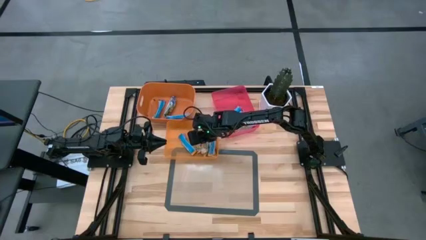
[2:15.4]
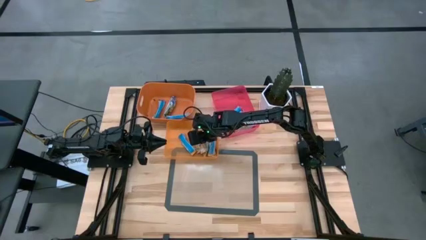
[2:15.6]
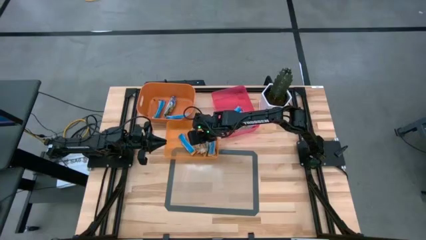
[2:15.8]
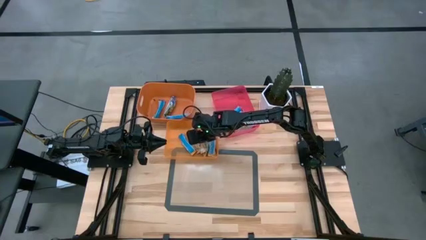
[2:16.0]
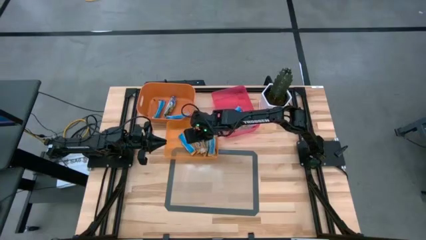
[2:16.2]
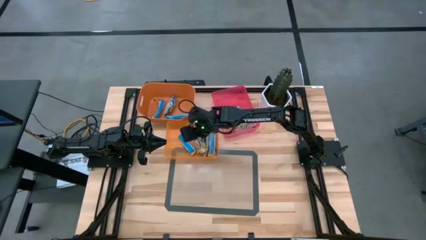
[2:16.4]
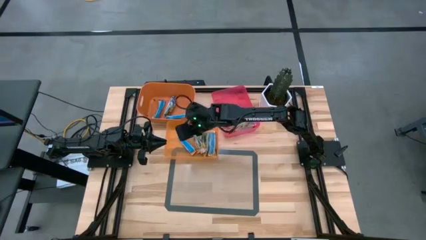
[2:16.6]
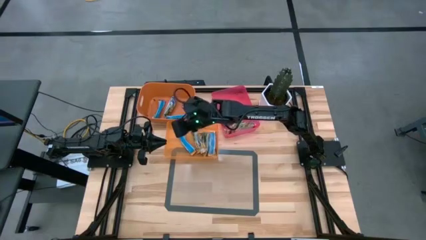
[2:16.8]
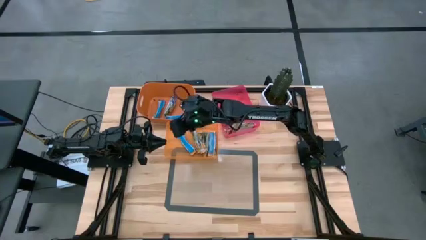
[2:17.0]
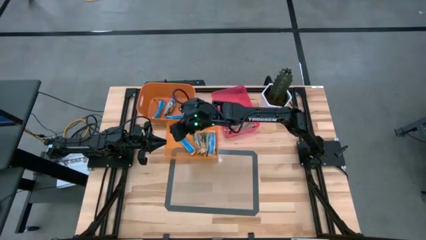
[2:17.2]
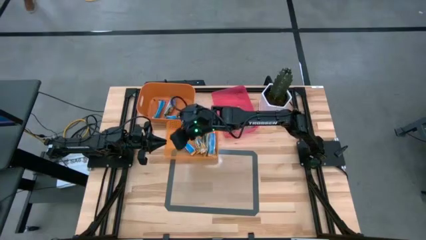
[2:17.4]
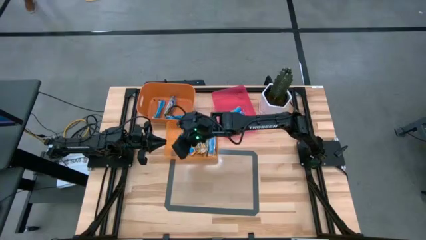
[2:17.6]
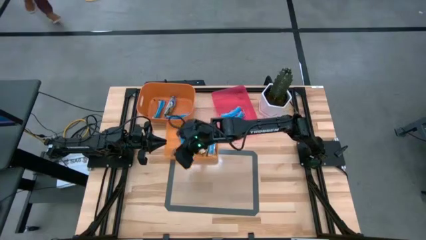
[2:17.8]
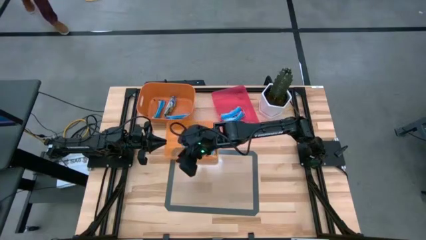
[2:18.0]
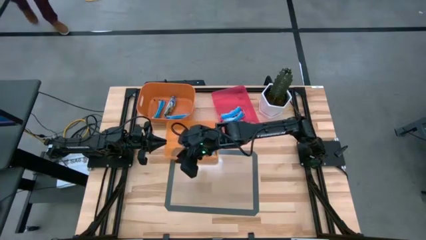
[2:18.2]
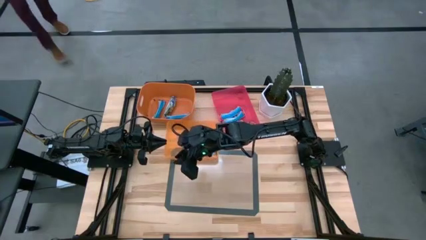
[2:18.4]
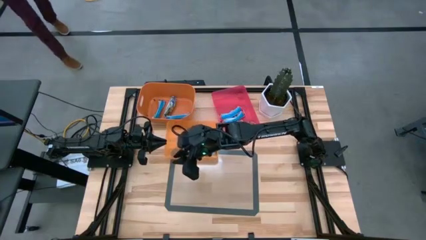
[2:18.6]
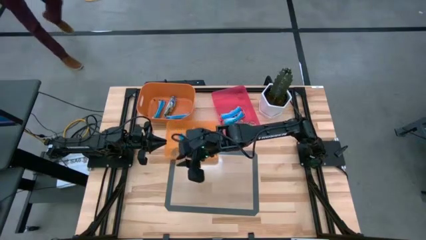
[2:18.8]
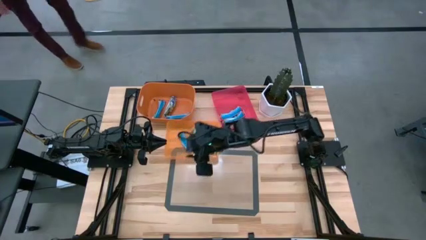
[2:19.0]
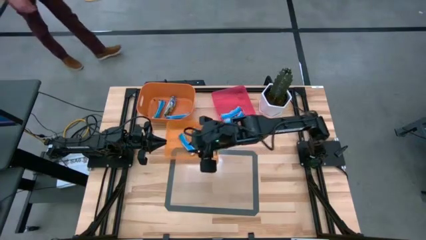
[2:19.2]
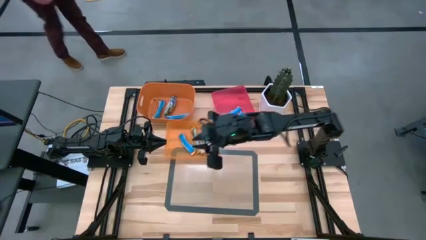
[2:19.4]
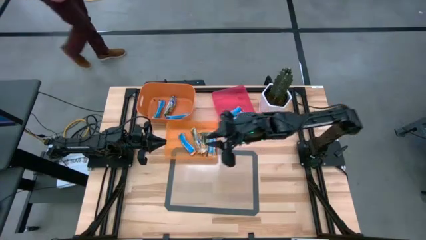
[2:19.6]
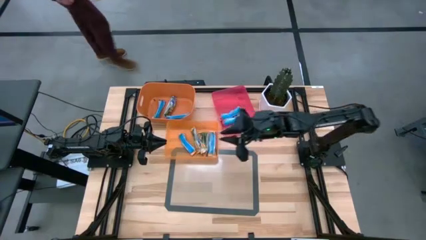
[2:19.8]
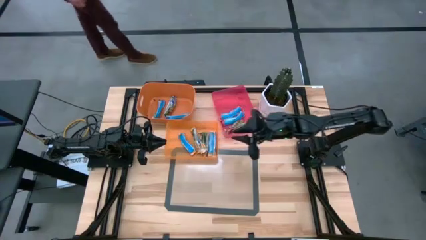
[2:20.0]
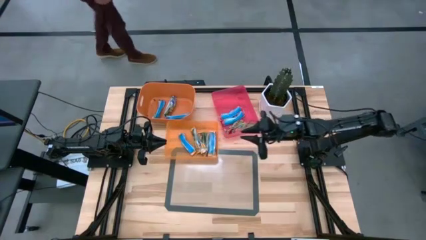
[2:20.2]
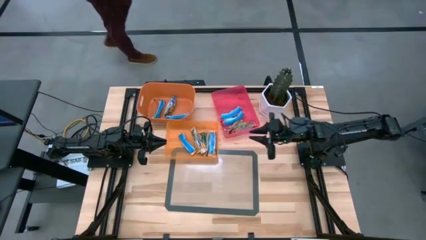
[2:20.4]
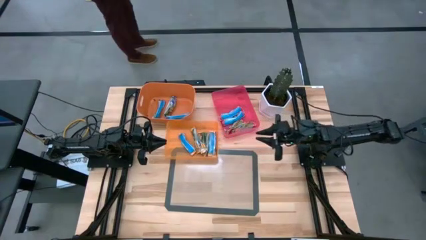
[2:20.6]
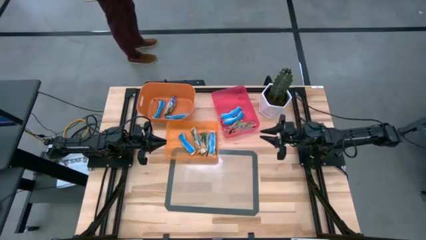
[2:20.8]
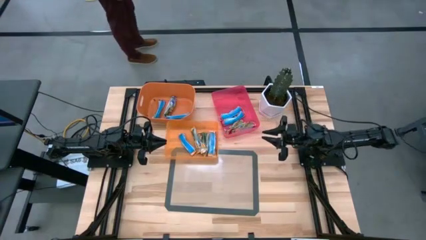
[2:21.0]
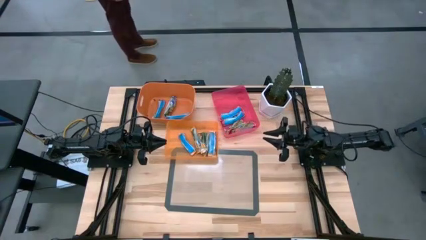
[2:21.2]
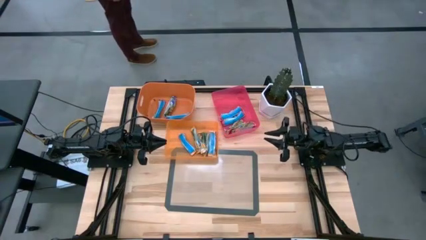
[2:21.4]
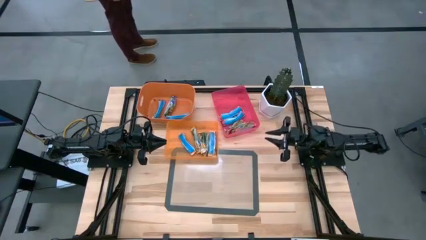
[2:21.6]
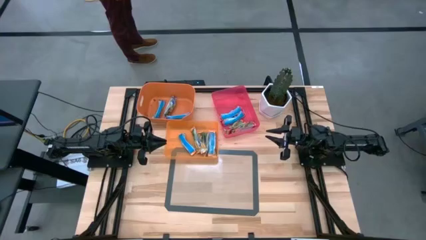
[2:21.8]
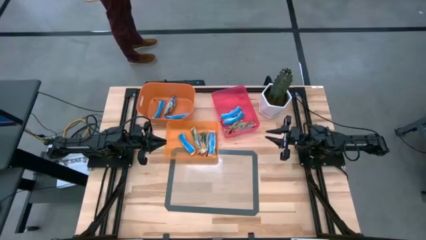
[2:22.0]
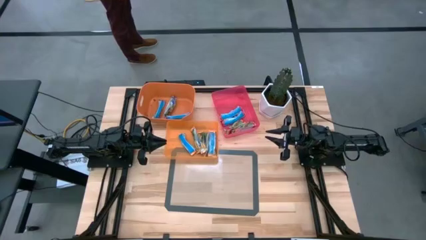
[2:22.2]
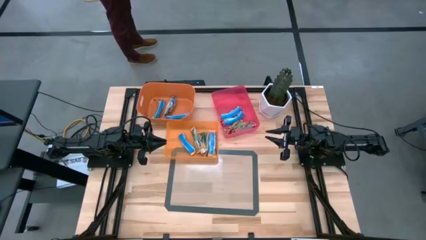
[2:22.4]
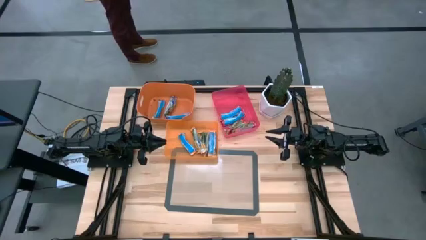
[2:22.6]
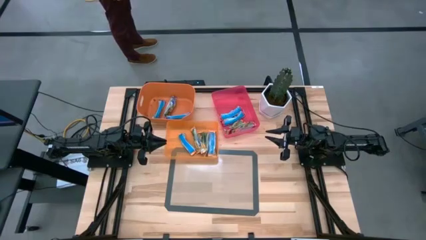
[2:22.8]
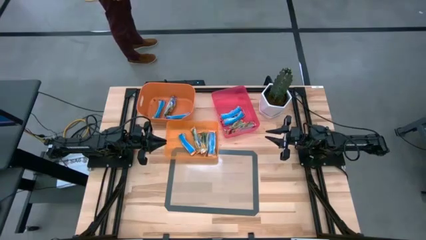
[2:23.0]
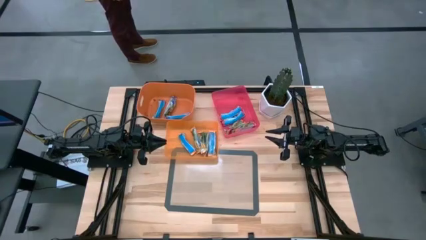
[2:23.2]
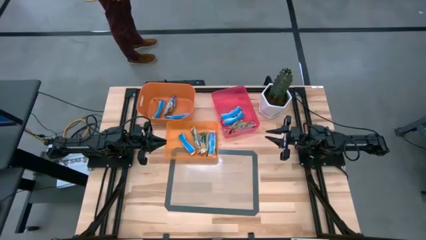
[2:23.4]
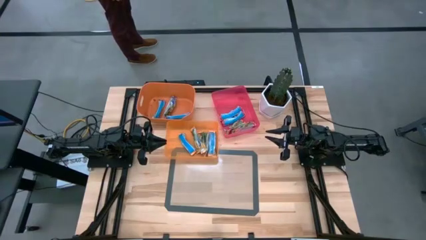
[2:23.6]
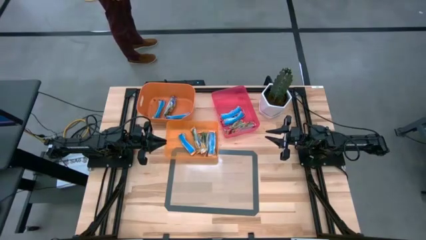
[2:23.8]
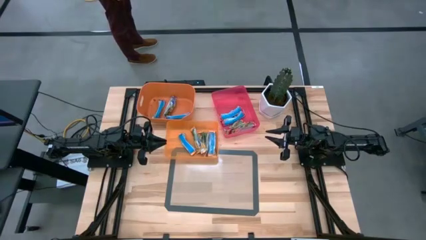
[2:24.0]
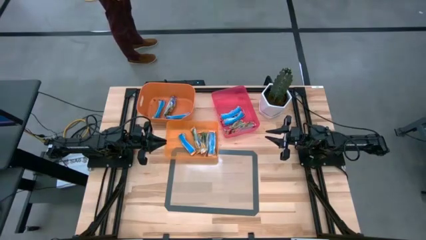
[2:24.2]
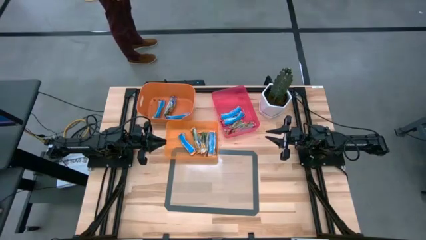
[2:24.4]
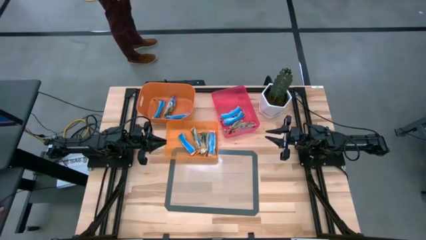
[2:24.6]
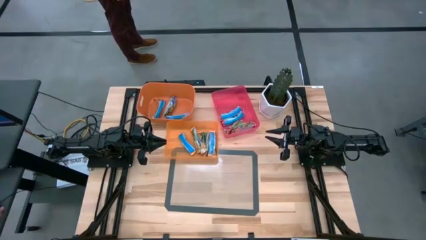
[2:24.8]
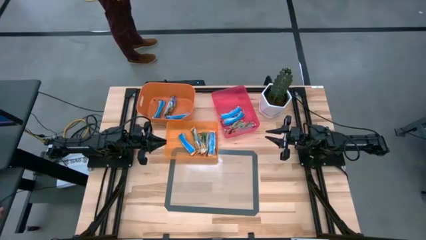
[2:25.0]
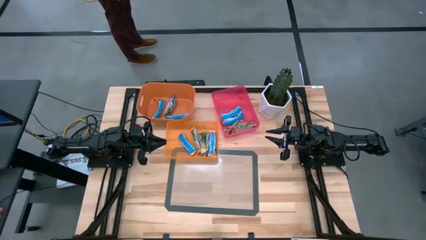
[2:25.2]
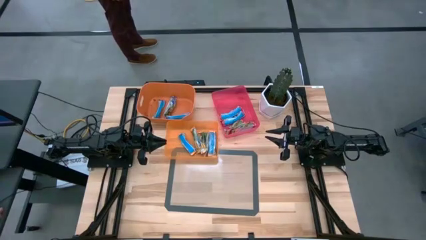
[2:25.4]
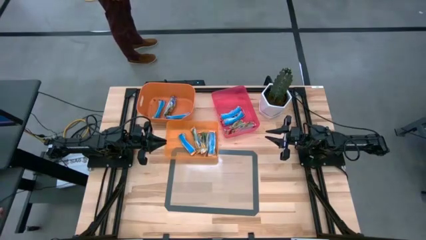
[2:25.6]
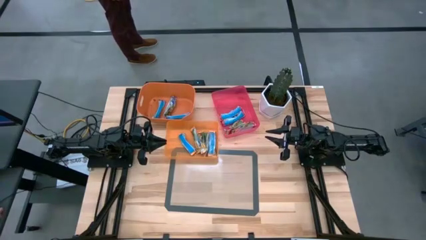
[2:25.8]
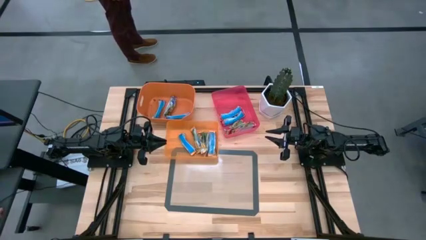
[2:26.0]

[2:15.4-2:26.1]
Task: Pick and place Granola Bars by type
Return to Home Position

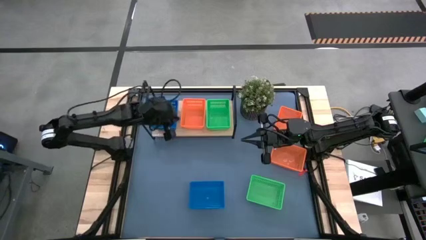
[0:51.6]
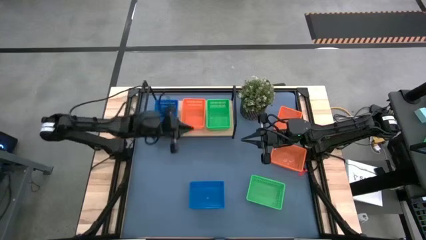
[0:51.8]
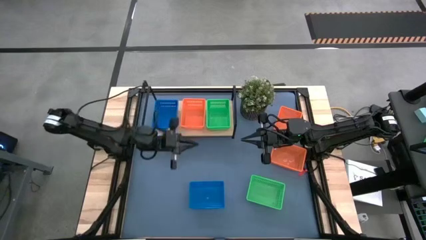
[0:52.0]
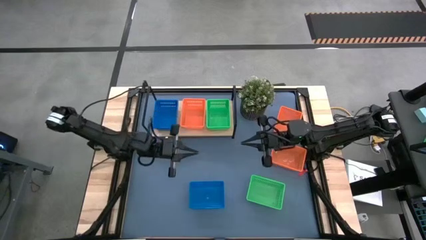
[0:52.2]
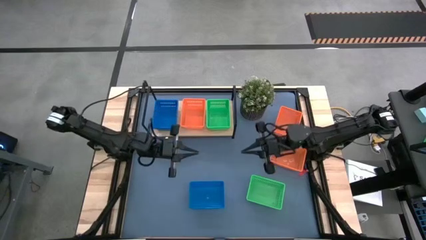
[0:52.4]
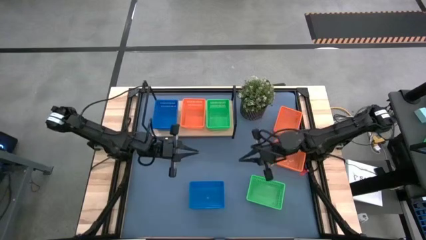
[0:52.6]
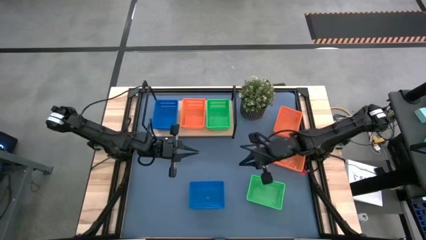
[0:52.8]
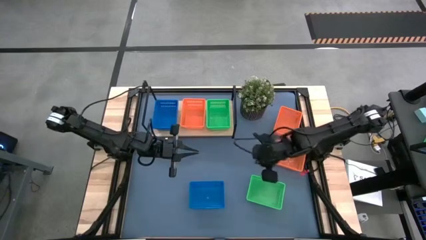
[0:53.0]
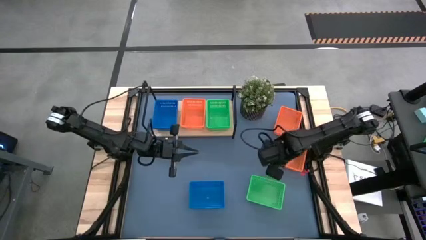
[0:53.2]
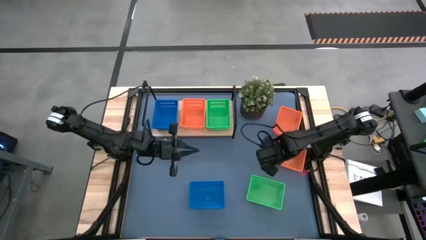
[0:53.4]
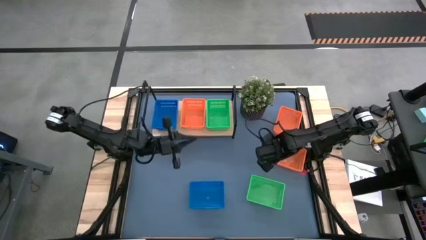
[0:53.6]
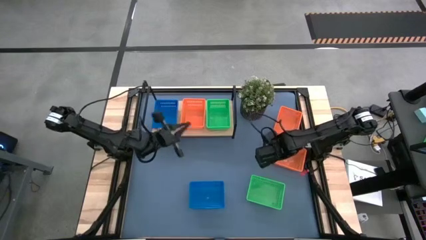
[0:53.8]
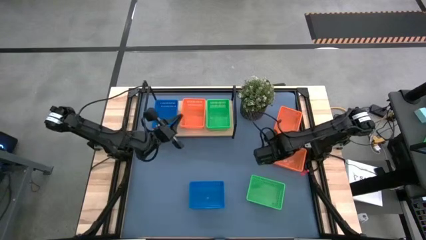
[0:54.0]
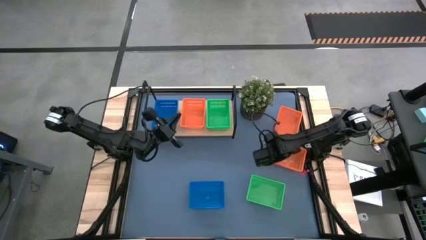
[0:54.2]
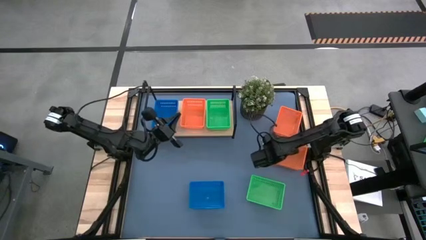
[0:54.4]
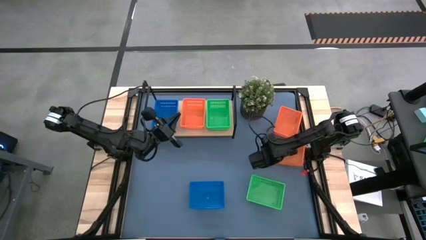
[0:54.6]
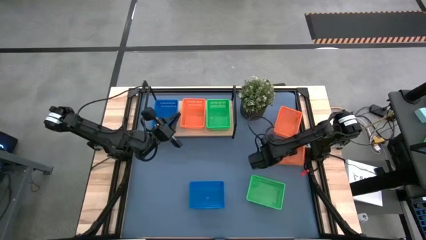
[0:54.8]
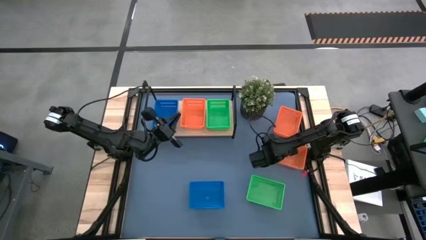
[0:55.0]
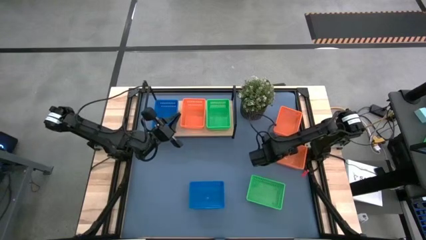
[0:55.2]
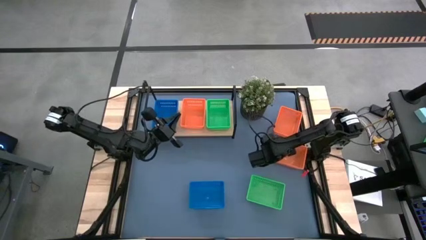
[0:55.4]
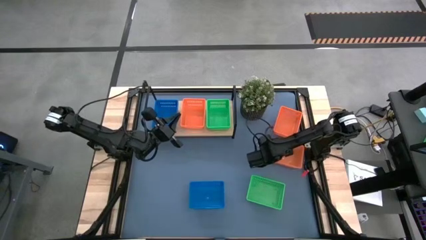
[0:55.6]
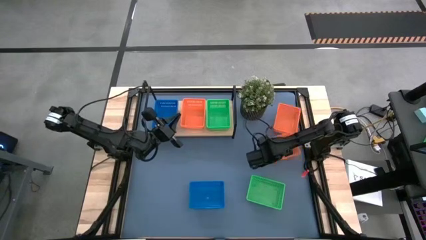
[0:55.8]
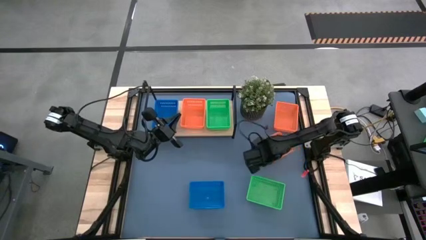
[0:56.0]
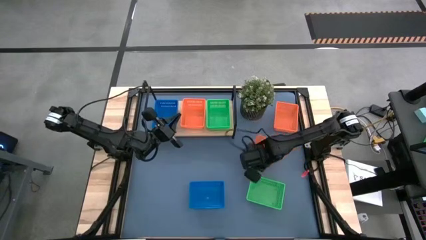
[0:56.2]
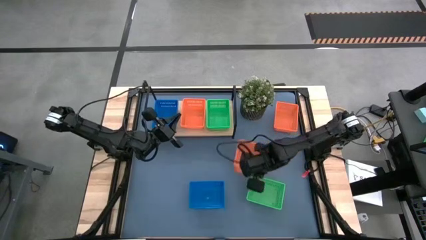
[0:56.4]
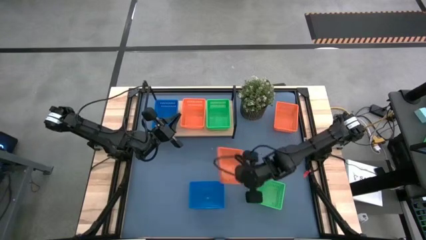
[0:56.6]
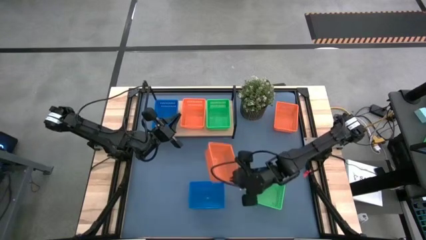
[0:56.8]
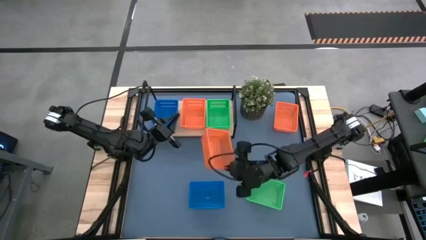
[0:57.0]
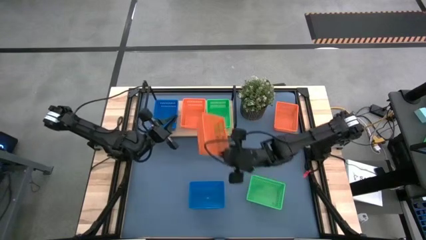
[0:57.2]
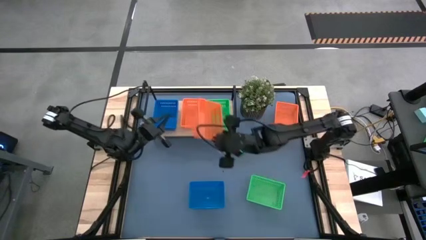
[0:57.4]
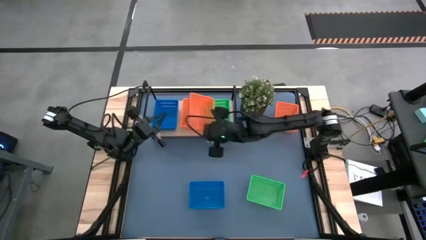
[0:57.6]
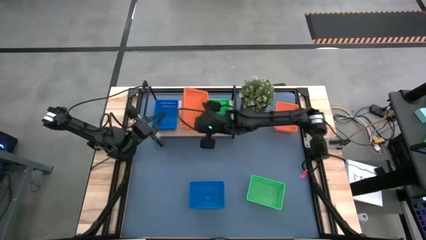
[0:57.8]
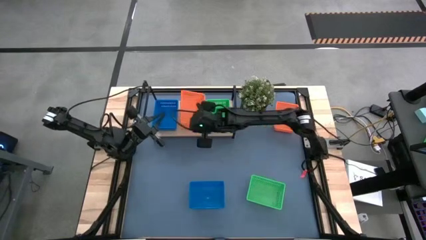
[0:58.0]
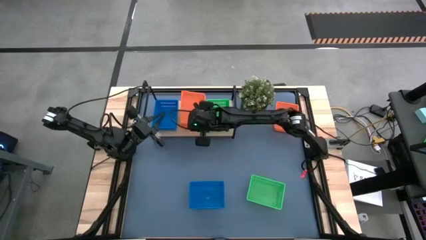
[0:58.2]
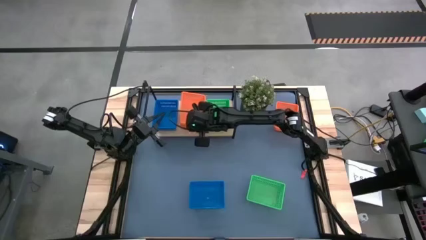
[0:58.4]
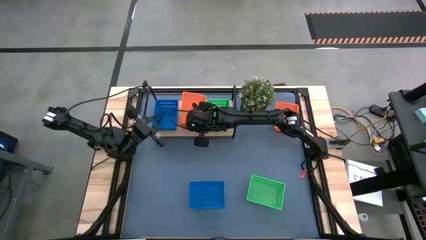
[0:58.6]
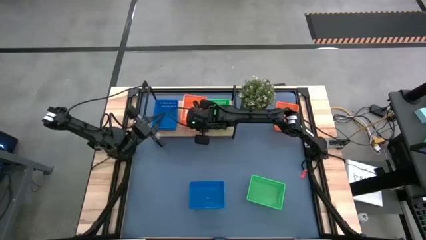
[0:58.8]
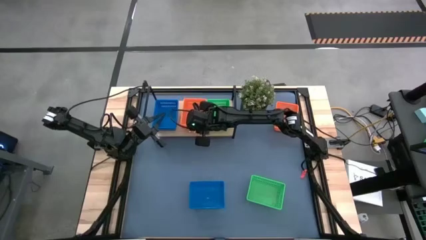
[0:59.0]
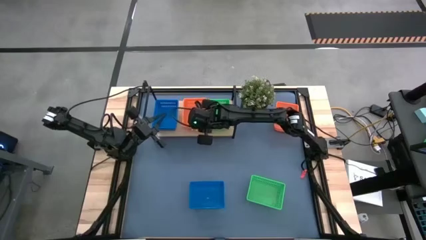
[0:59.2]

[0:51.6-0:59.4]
Task: Stack baskets on shelf by color
Stack the bottom orange bin on top of the orange bin on the shelf
